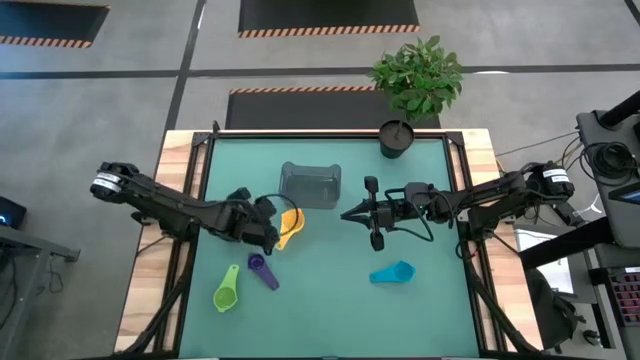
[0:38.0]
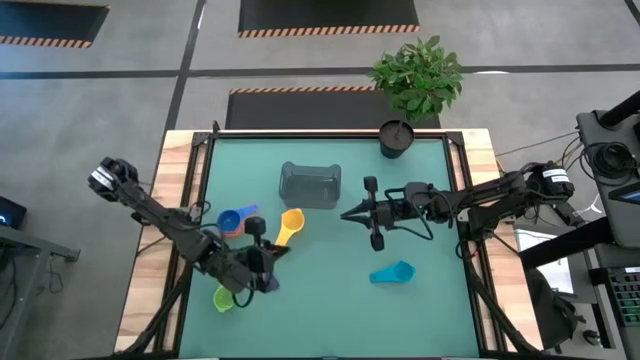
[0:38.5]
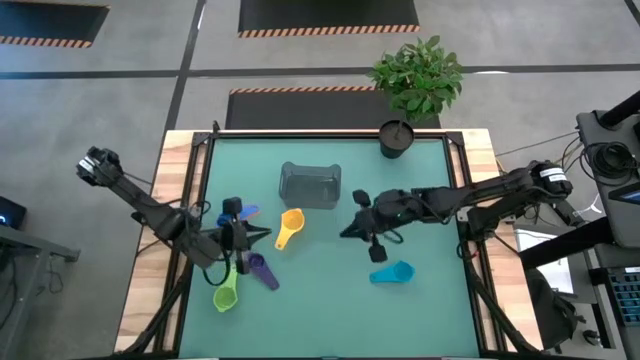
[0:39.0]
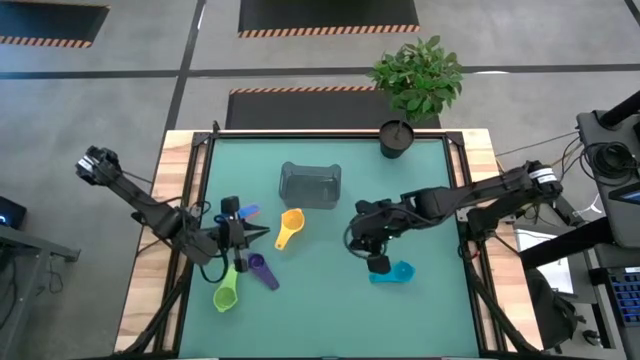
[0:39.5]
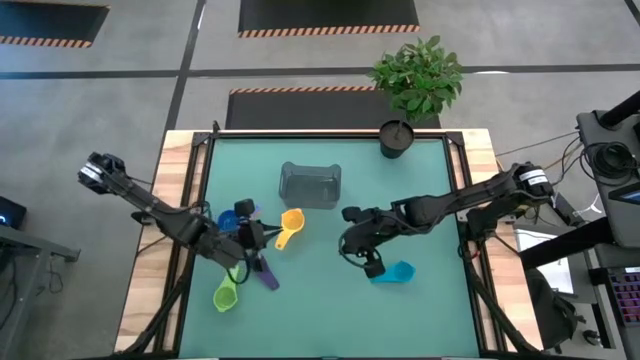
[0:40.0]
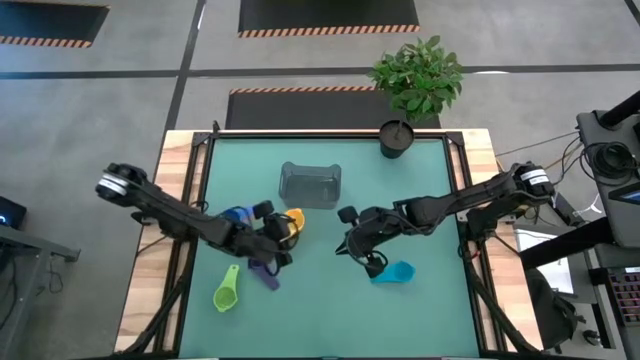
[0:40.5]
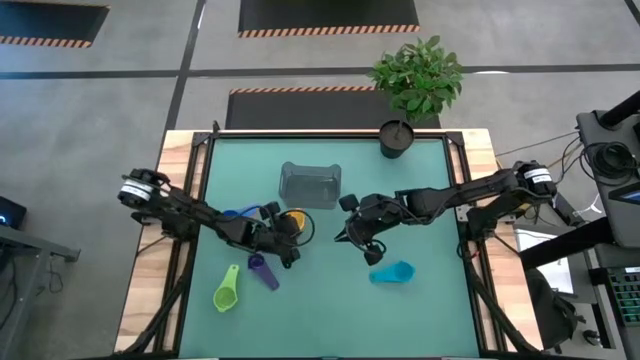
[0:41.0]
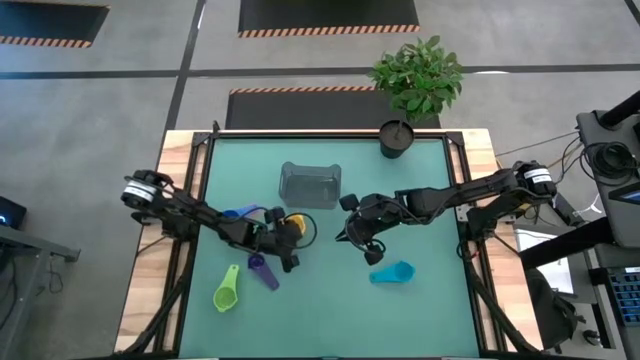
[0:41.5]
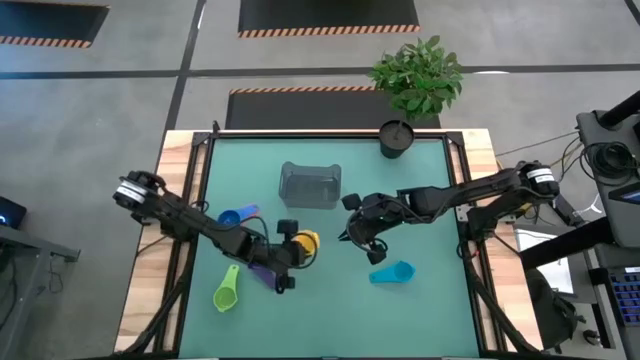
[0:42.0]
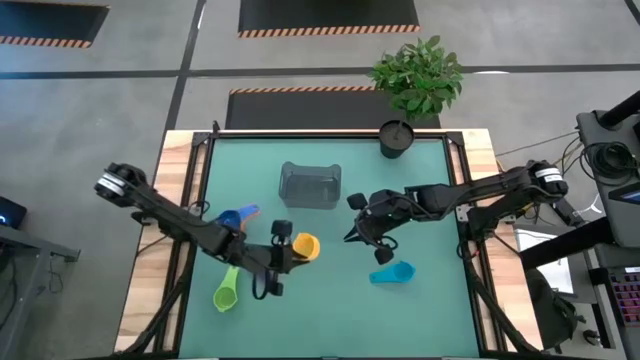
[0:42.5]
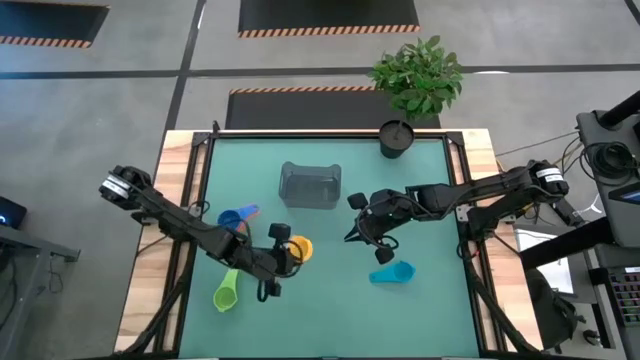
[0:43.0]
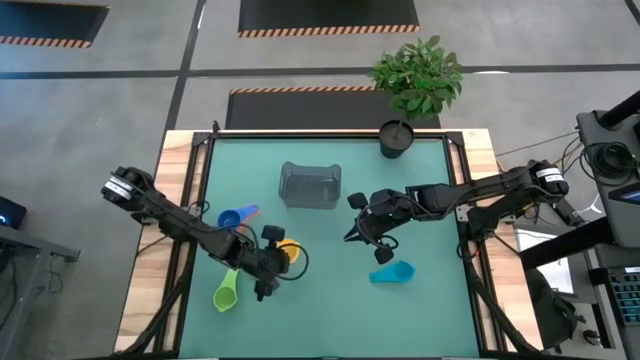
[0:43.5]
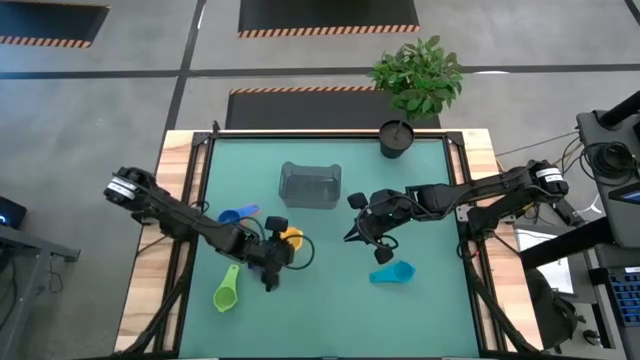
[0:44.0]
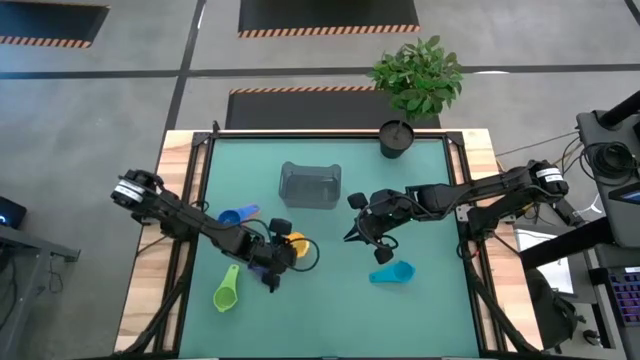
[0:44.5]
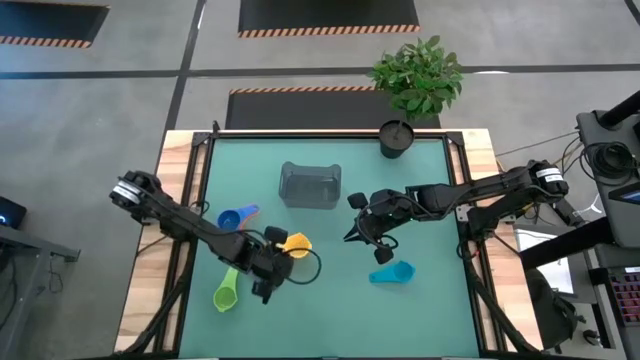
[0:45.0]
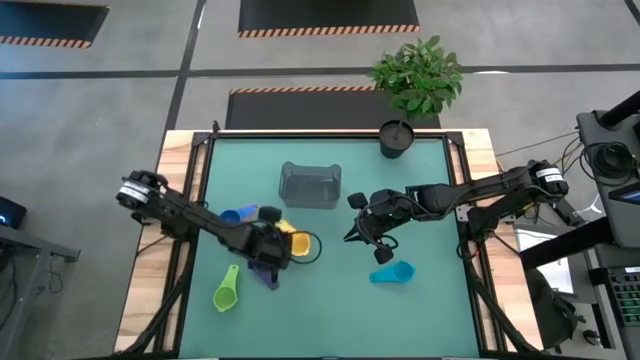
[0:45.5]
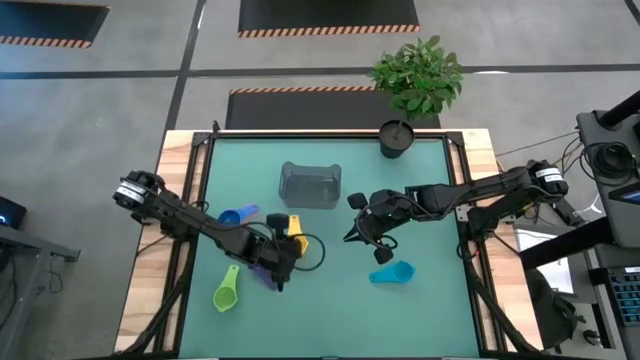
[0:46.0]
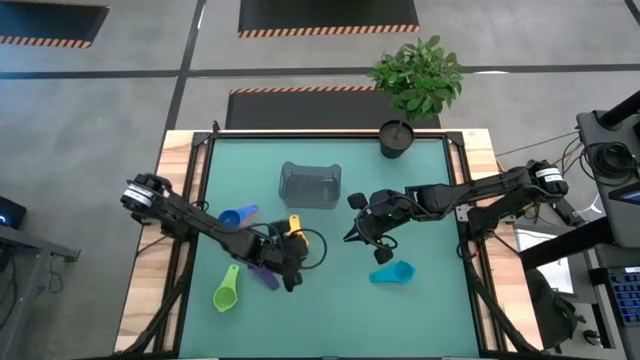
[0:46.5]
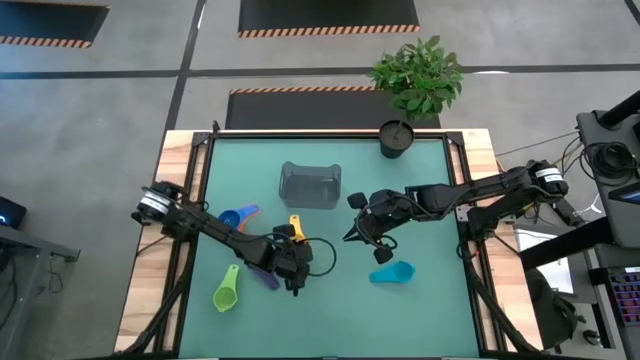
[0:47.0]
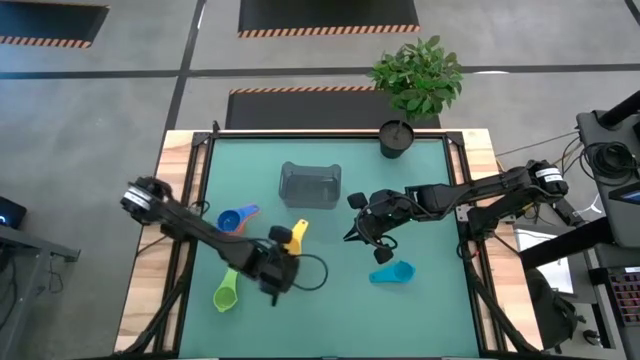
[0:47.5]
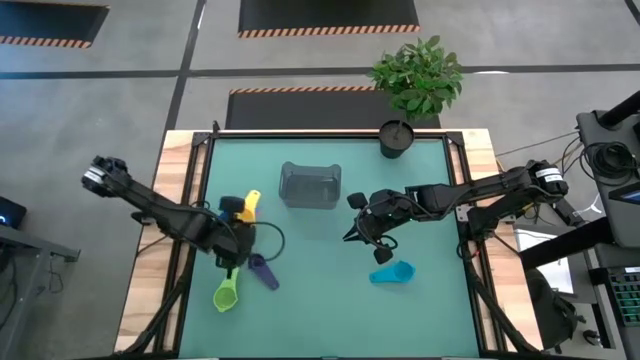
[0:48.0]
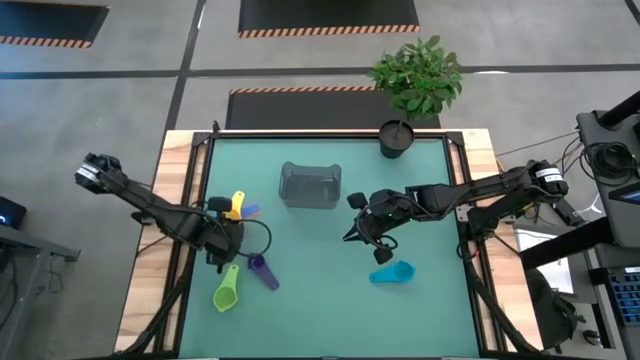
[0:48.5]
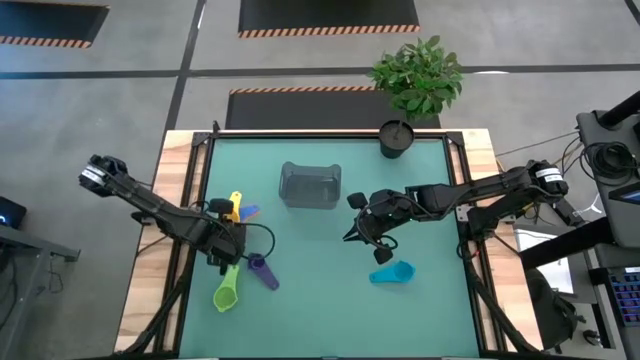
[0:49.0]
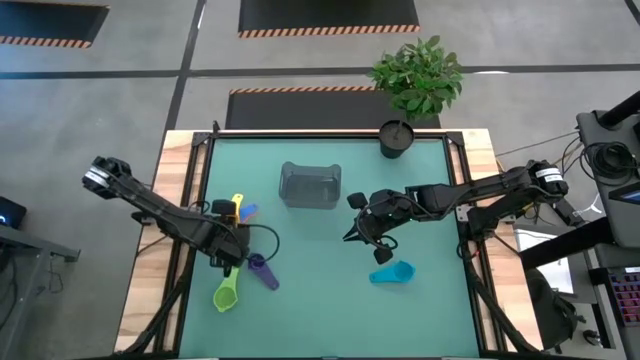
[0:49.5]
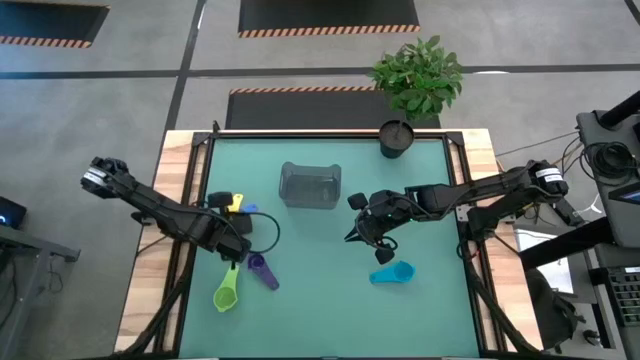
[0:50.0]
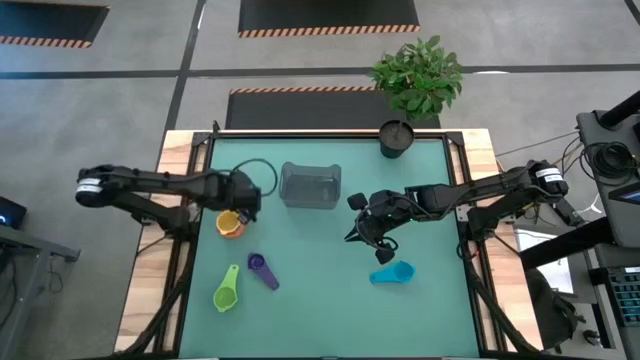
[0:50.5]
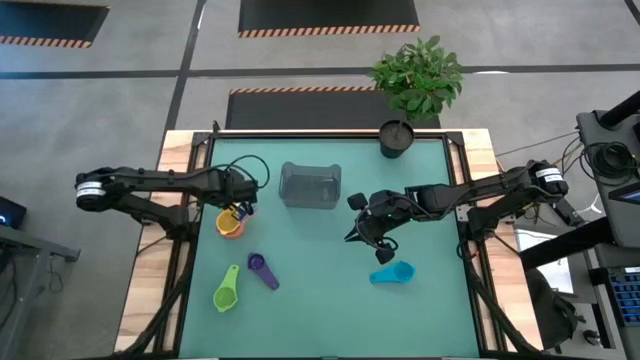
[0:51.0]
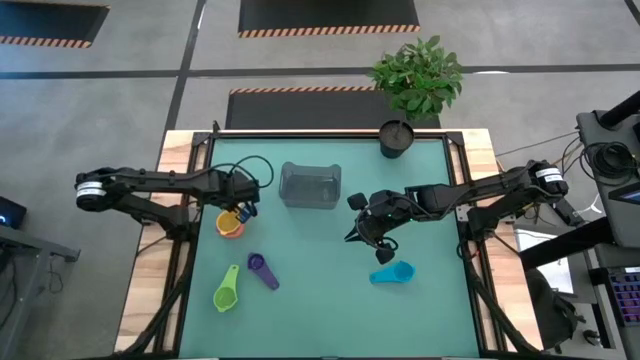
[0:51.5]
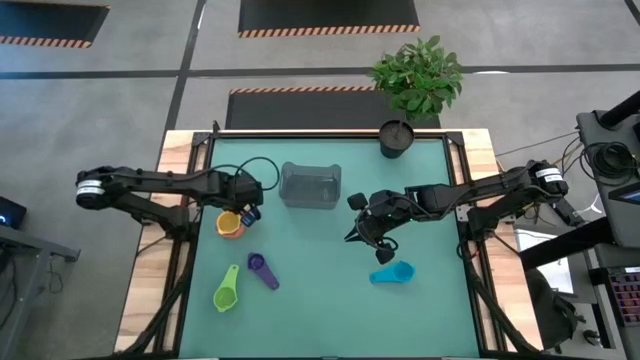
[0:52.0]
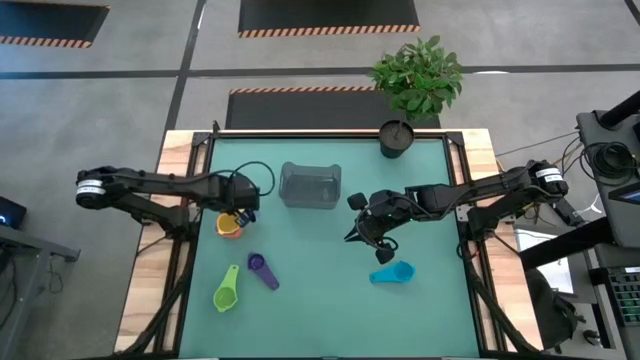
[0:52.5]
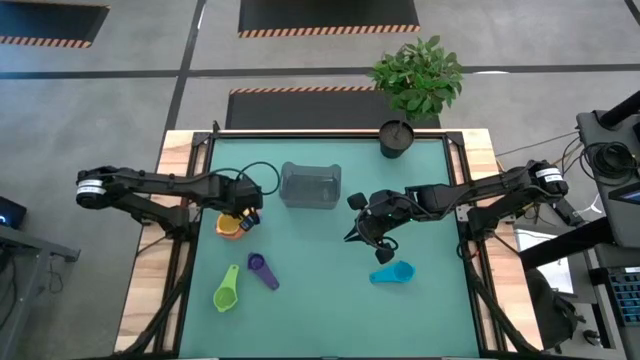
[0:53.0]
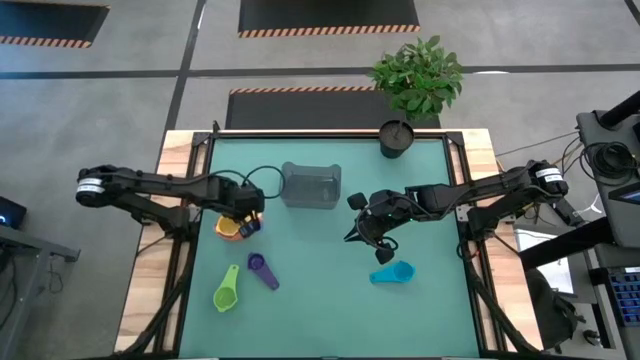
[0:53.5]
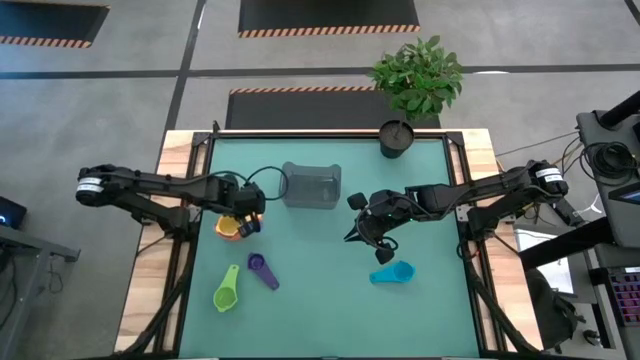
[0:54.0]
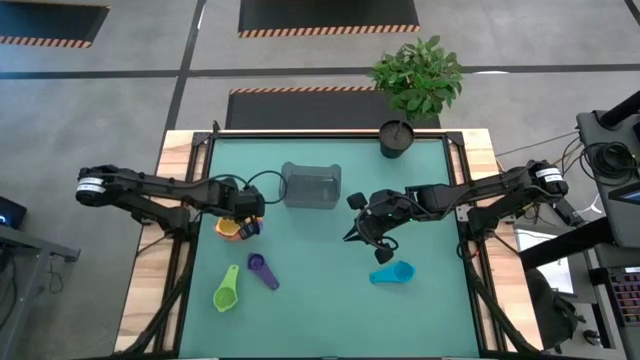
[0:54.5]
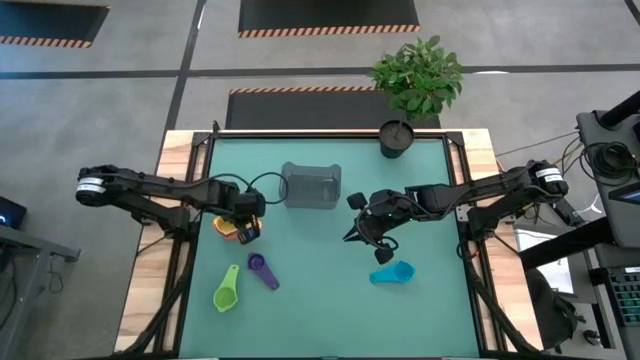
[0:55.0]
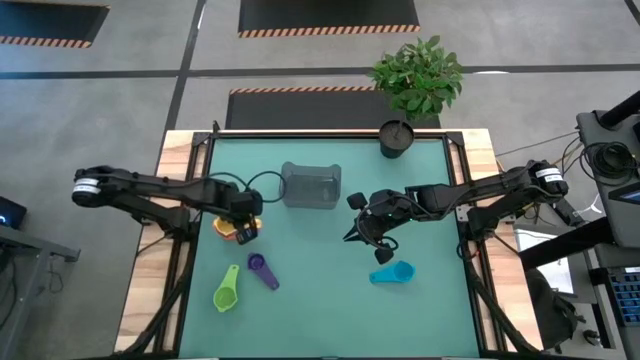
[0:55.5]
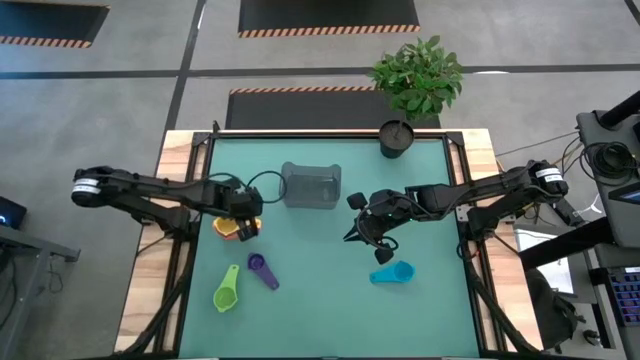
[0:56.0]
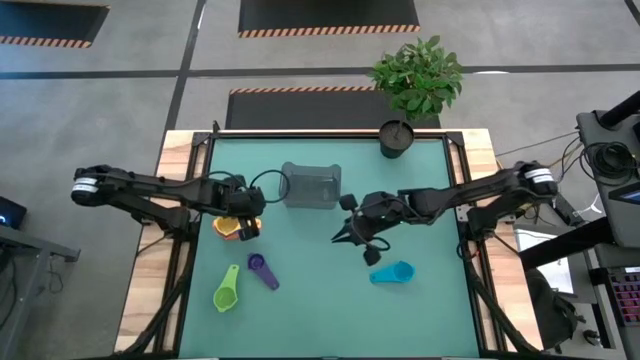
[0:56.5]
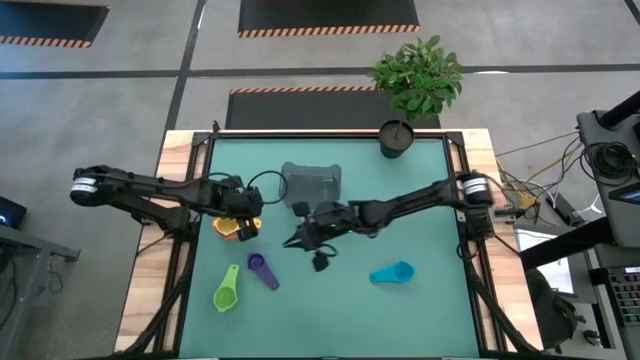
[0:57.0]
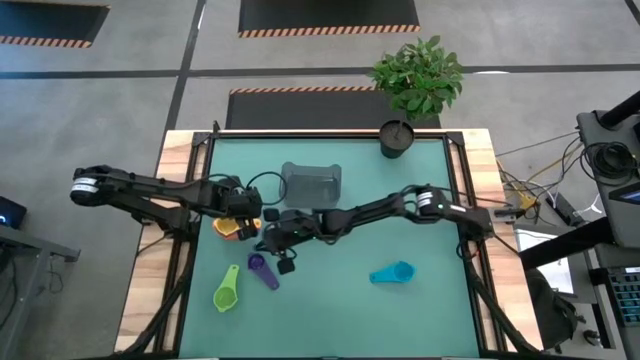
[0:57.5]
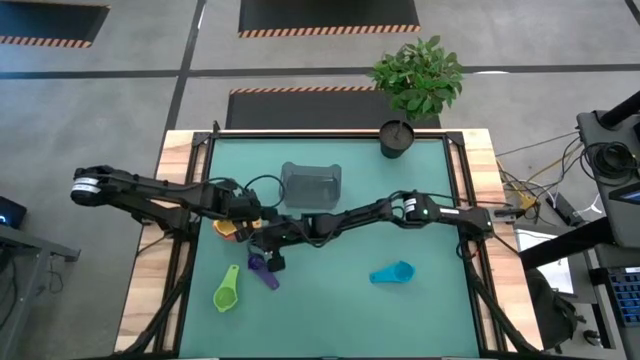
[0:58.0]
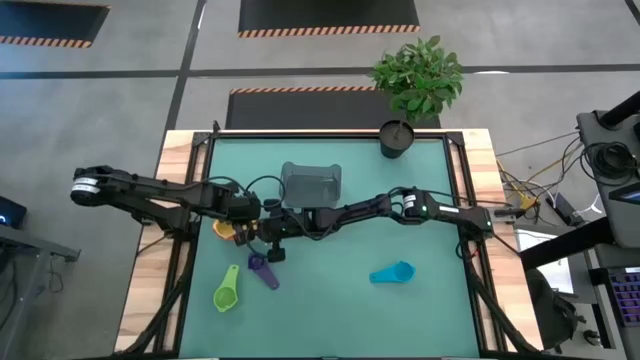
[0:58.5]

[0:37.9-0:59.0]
Task: Nest measuring cups in basket
Stack the yellow measuring cup into the blue measuring cup
